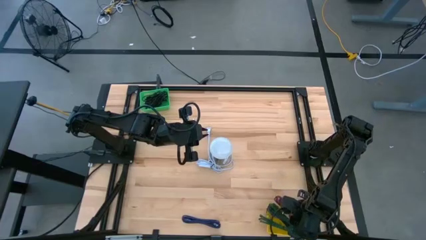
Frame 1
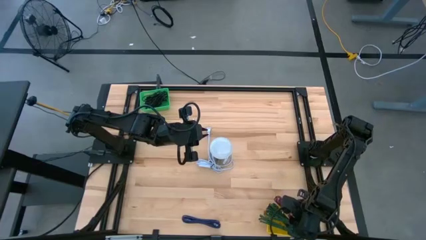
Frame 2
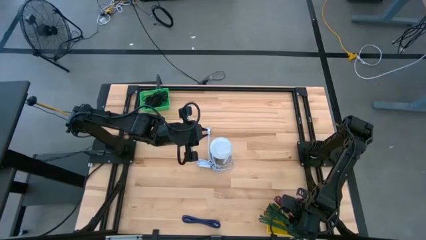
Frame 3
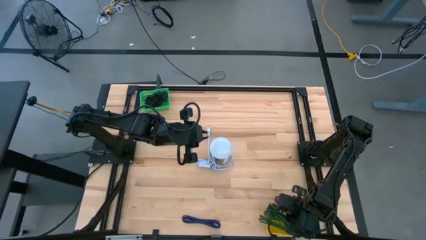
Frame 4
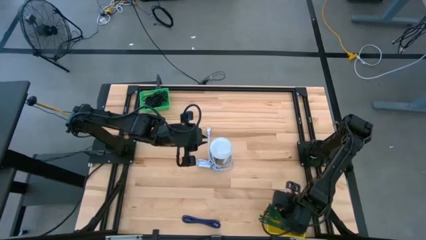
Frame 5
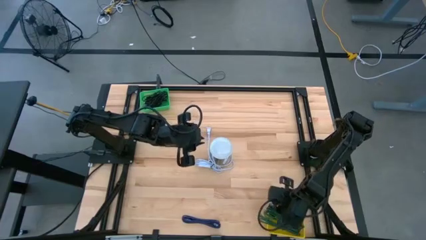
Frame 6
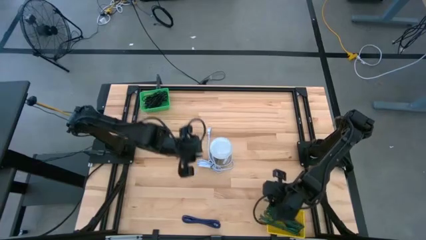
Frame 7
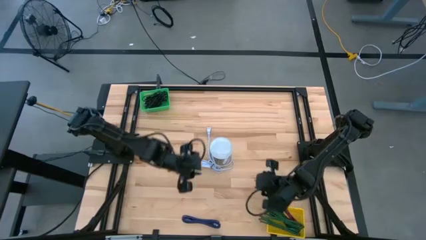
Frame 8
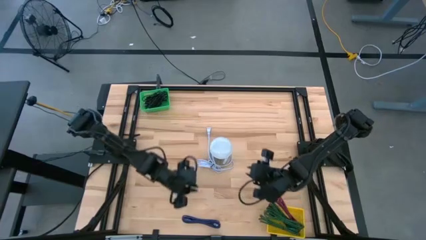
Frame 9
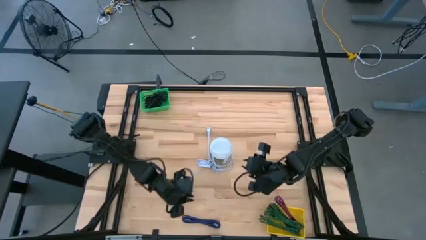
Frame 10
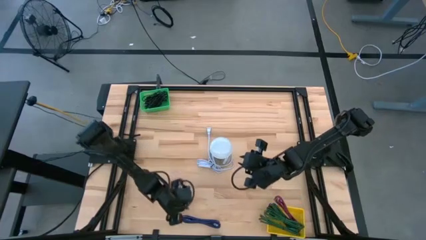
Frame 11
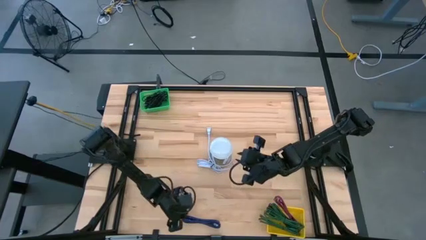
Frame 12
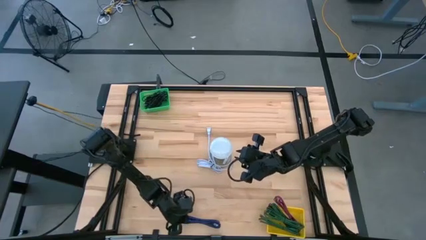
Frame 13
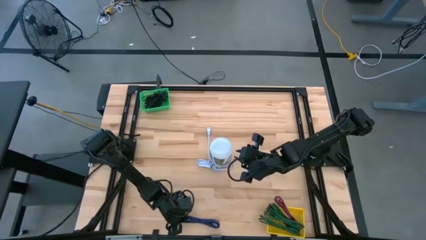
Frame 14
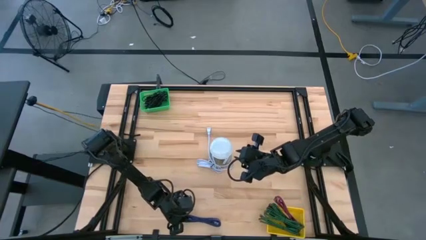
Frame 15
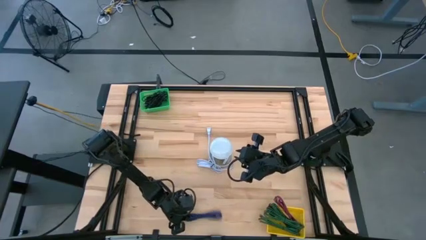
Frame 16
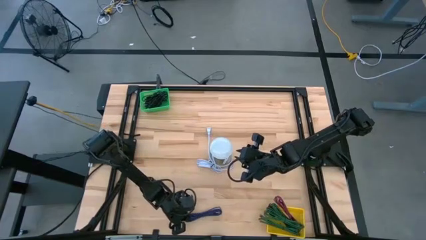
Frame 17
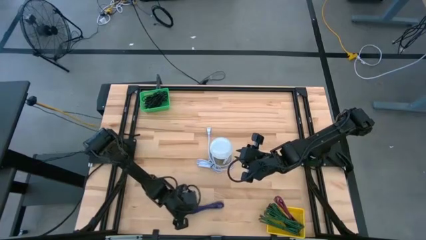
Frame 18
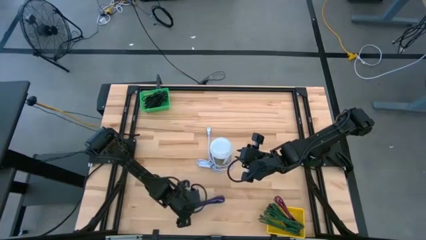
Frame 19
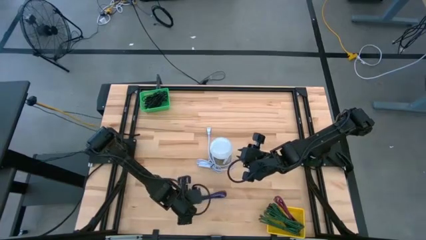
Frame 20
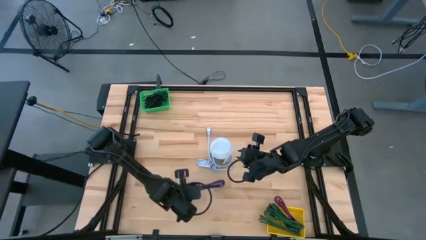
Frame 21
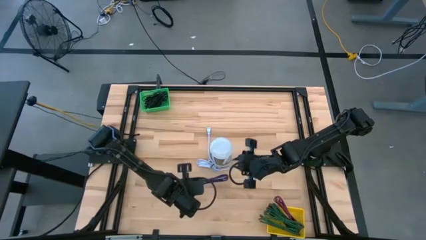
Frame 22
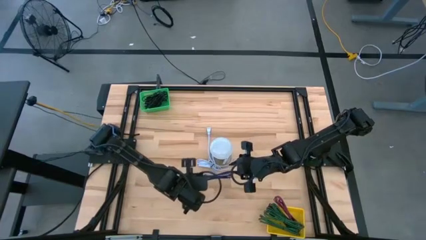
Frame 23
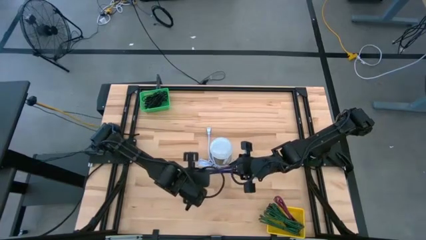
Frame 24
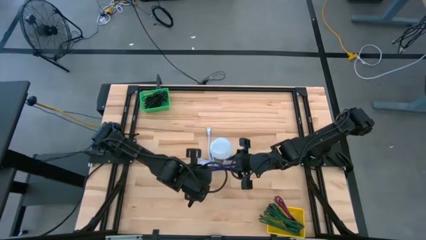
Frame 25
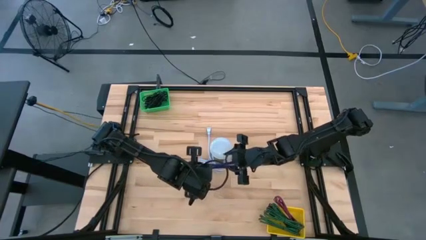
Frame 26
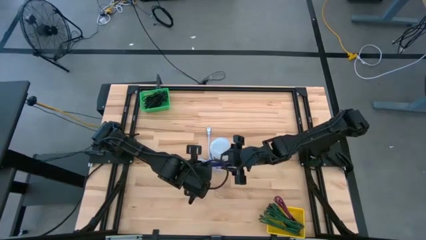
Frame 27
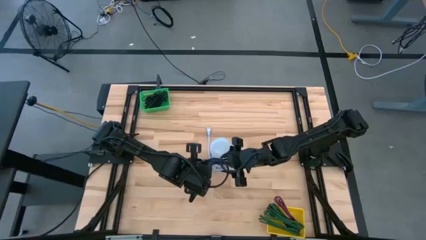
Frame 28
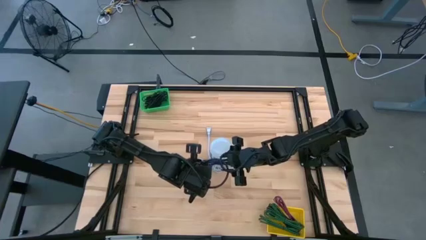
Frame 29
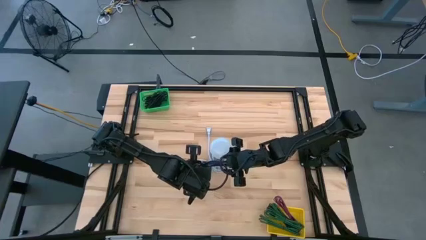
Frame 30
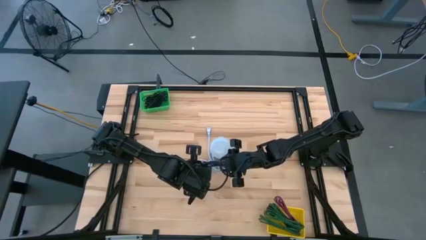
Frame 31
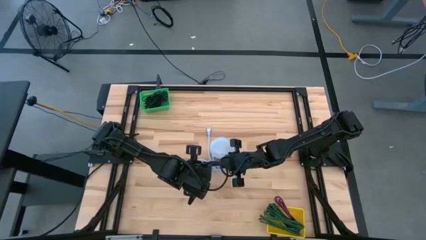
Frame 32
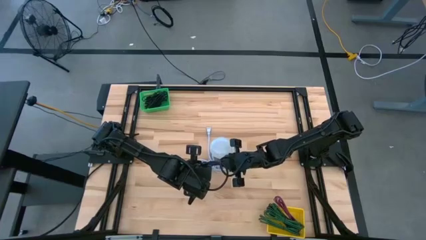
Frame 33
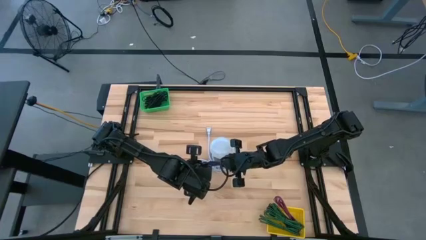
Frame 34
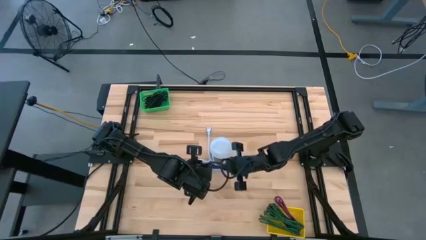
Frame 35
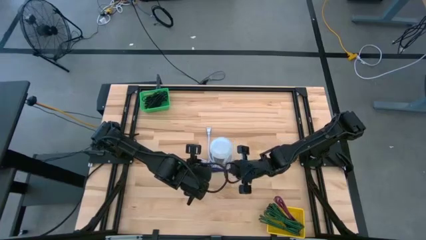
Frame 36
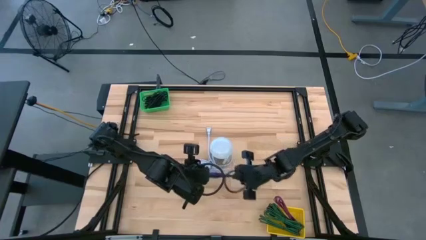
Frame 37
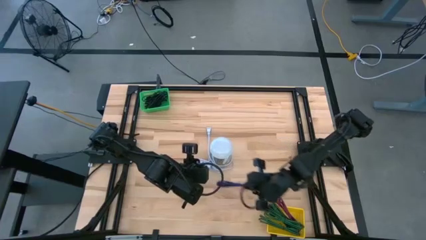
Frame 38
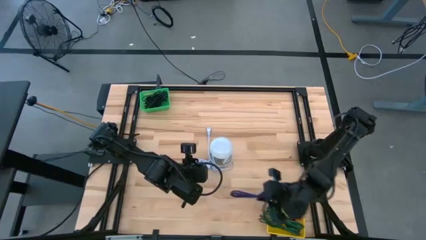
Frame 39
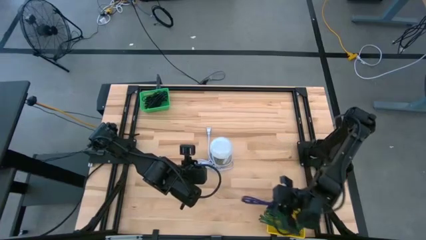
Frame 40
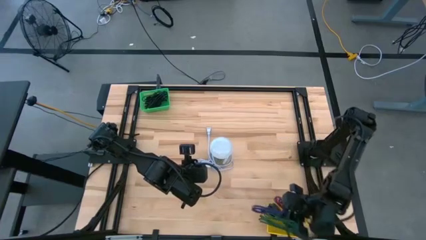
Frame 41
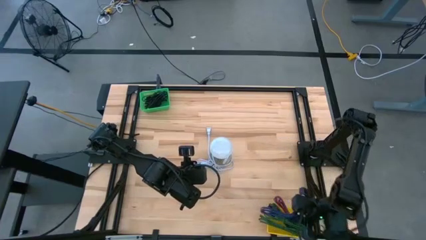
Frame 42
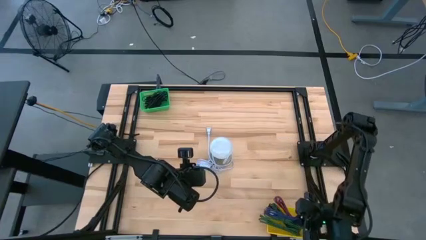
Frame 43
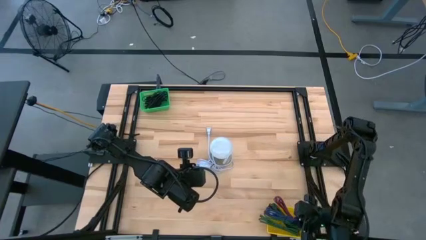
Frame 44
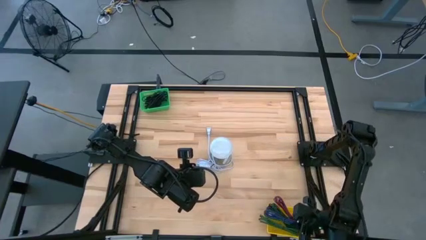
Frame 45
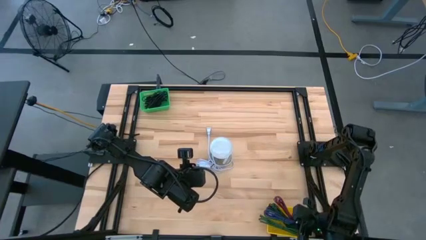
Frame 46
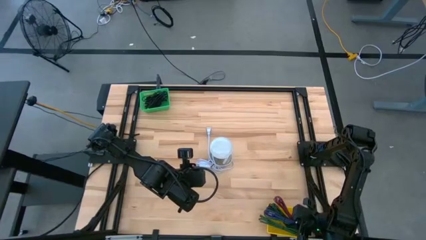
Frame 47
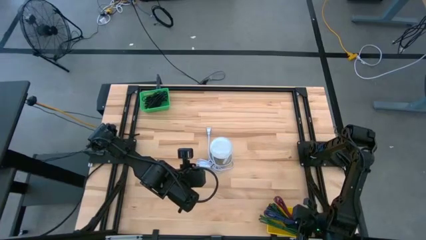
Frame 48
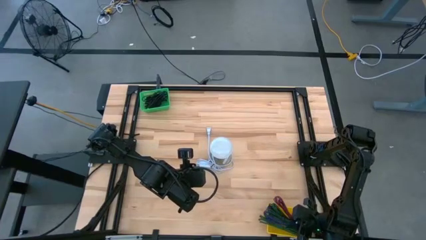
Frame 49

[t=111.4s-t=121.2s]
Task: Pick & Place USB Port
Put the violet black charger cable into the yellow basket

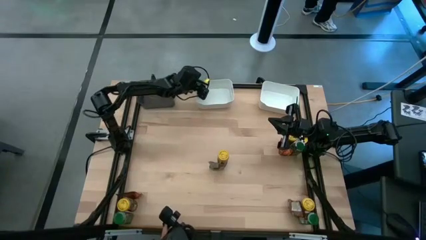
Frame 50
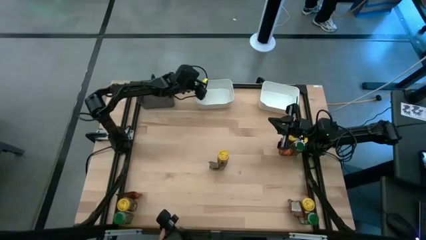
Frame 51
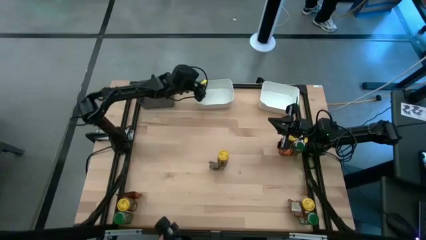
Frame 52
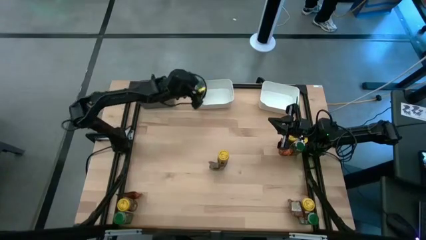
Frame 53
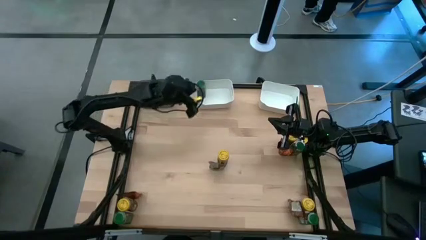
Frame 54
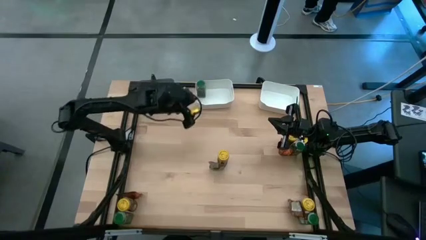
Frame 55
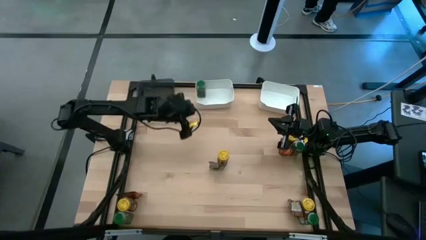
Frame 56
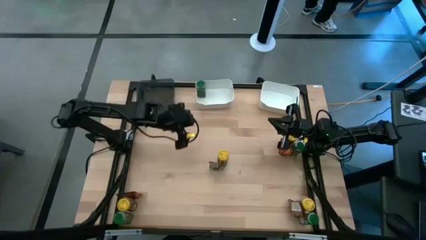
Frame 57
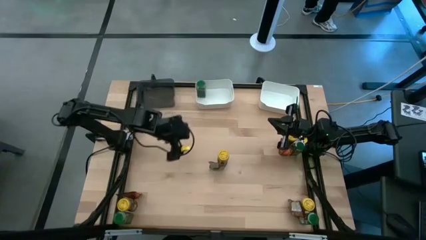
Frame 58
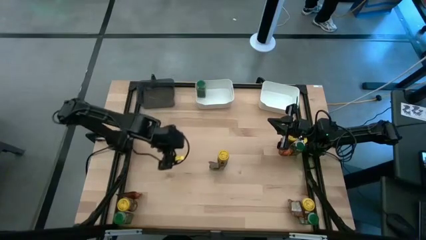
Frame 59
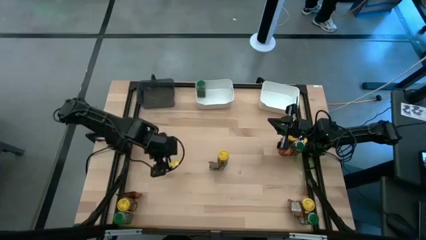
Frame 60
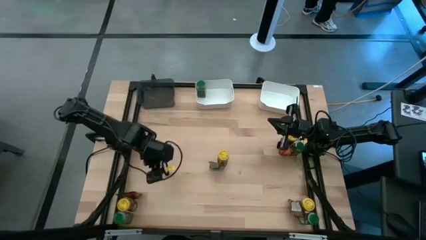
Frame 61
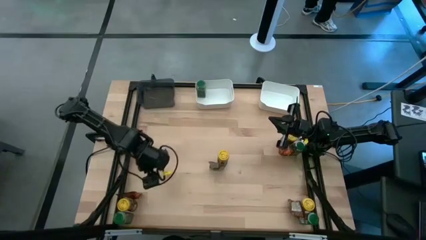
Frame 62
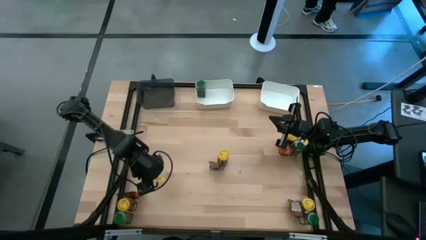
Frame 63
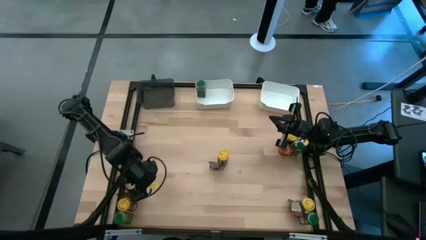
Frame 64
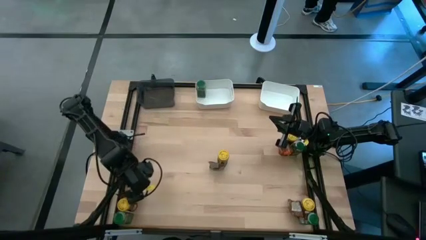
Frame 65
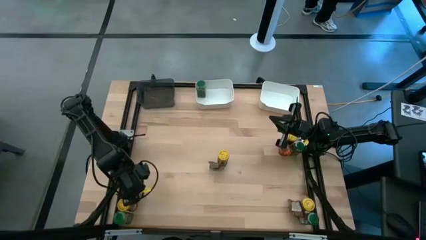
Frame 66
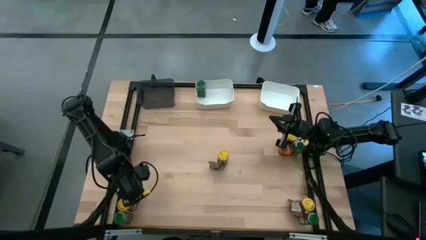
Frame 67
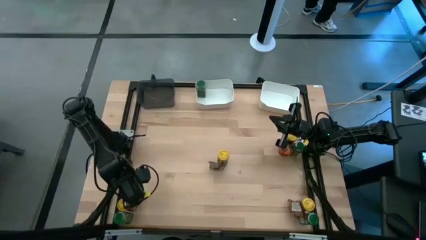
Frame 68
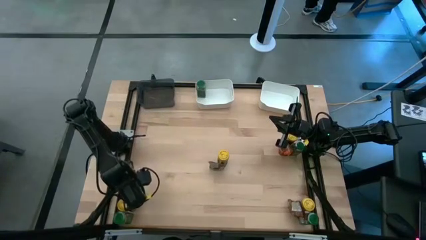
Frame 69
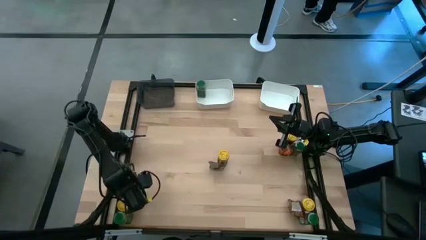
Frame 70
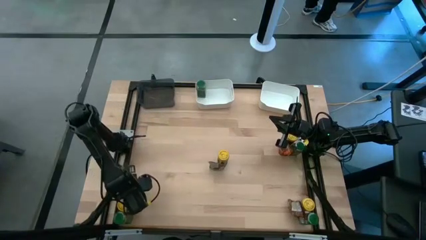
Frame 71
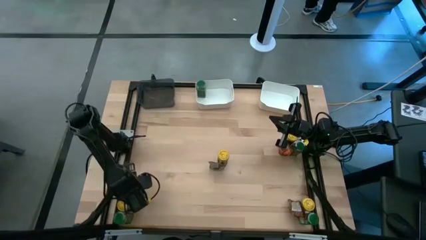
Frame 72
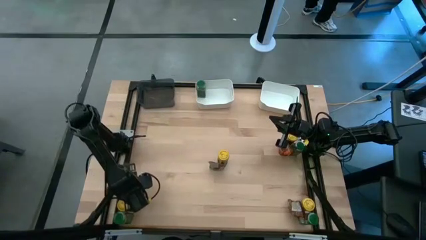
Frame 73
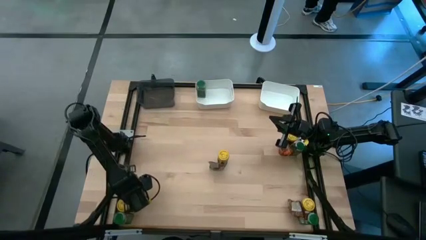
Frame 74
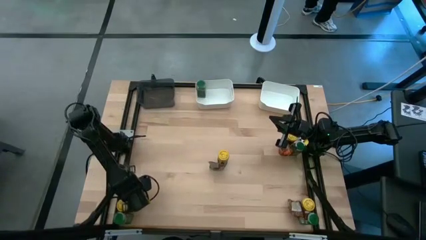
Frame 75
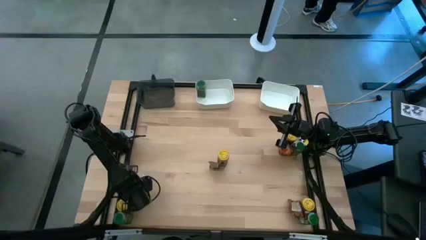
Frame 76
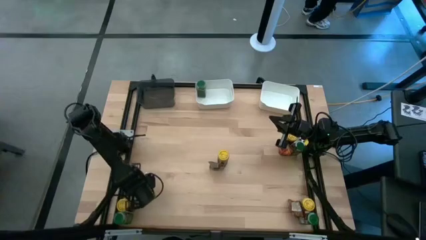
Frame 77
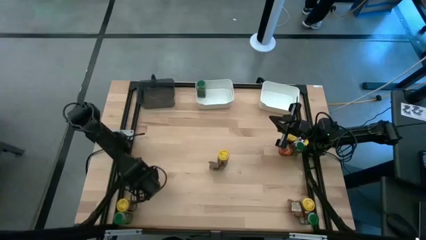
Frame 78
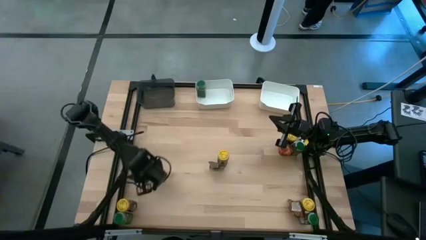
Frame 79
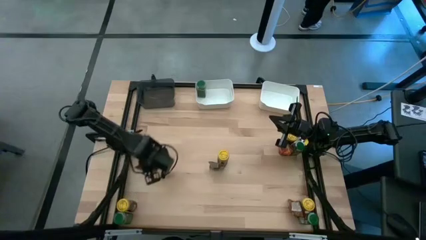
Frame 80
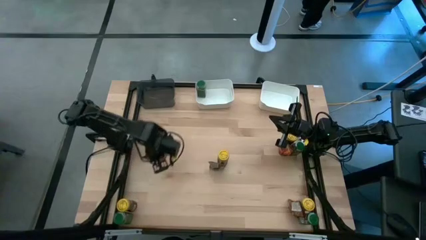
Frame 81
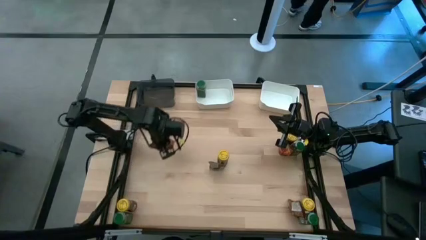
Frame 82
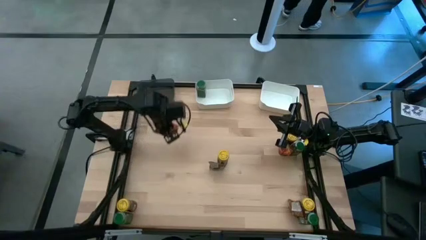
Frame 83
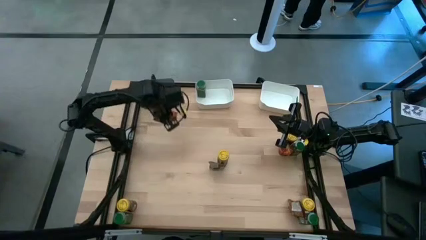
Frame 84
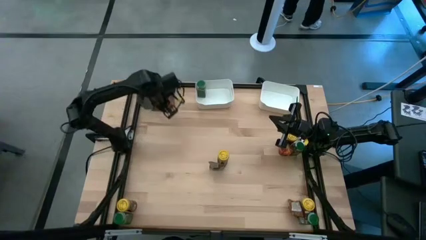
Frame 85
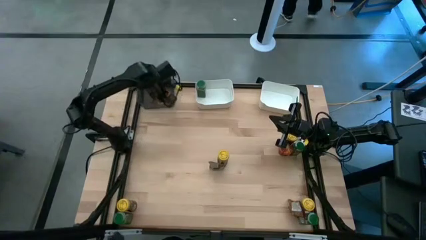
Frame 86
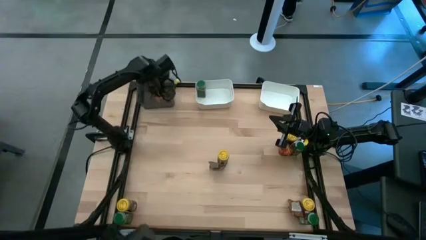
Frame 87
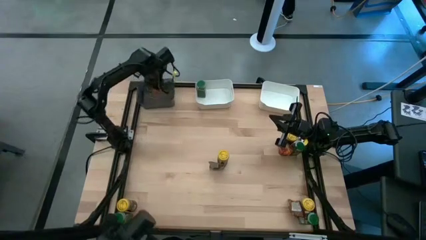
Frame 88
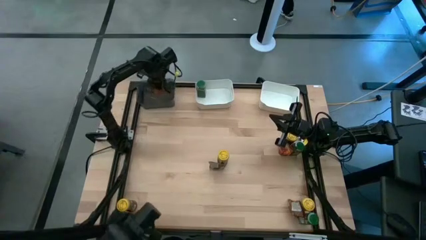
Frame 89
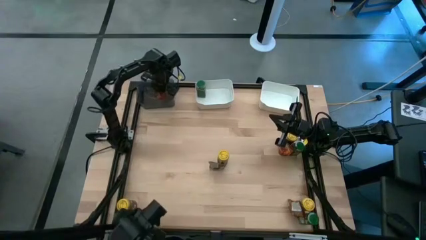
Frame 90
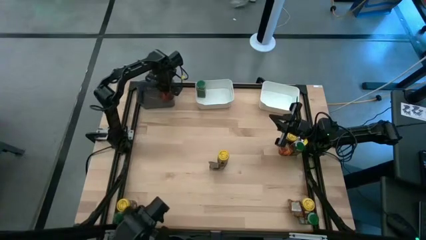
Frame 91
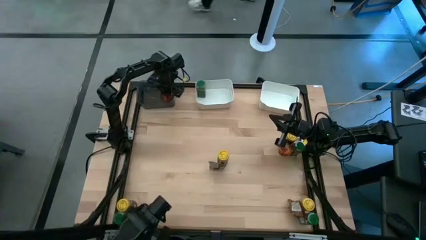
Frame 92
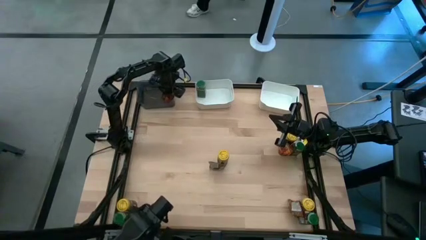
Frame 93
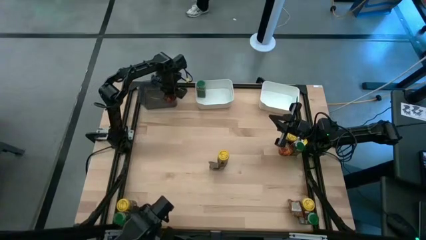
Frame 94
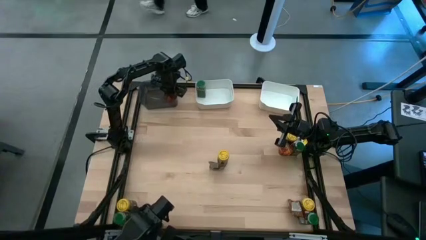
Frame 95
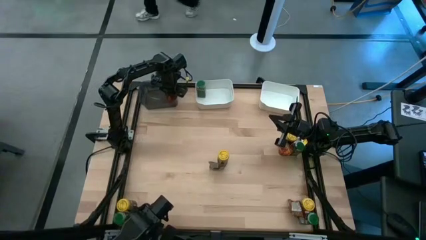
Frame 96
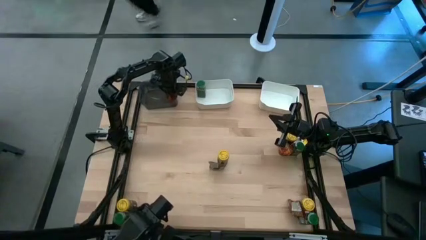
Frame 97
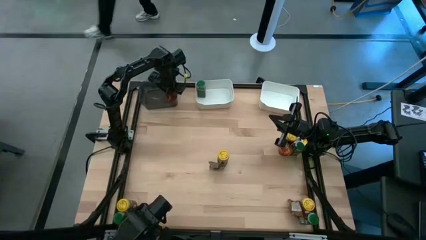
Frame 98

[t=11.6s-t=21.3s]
Task: Sort spices by type
Put the bottom left brown seasoning bag into the black bin
